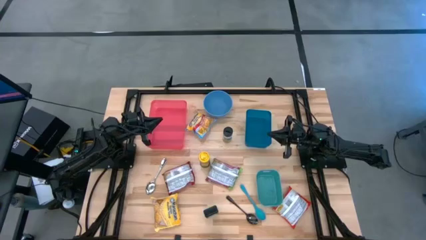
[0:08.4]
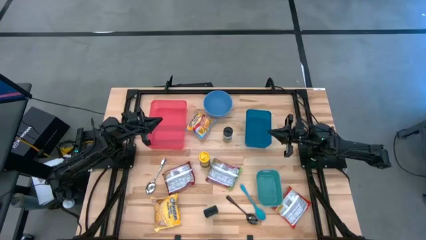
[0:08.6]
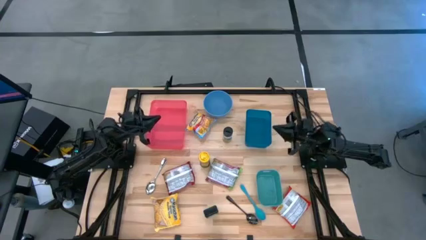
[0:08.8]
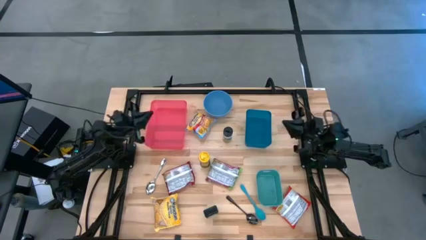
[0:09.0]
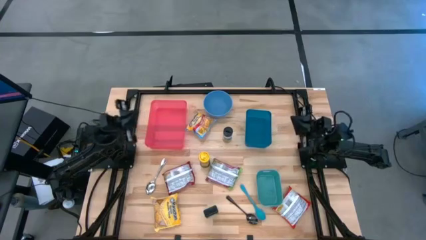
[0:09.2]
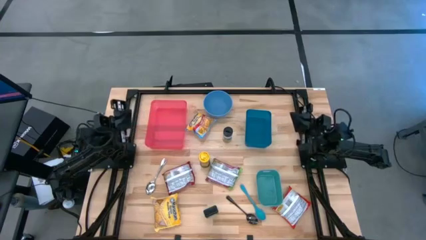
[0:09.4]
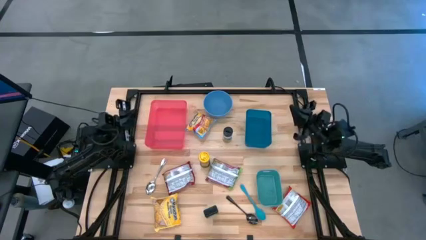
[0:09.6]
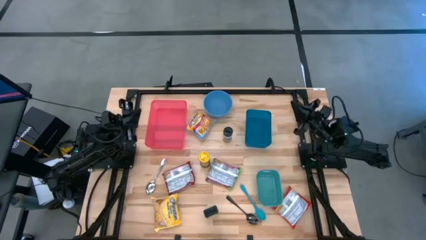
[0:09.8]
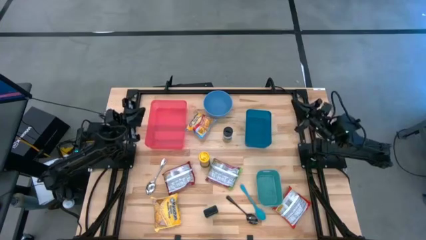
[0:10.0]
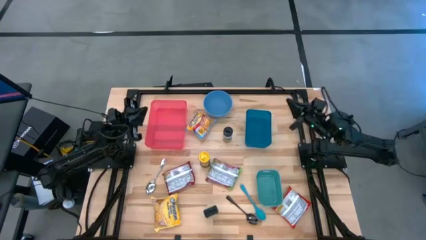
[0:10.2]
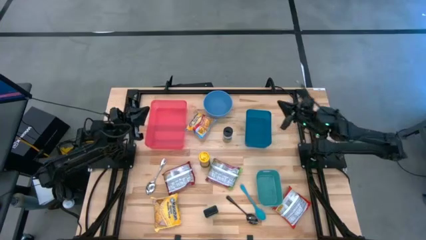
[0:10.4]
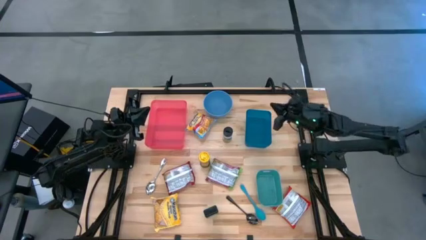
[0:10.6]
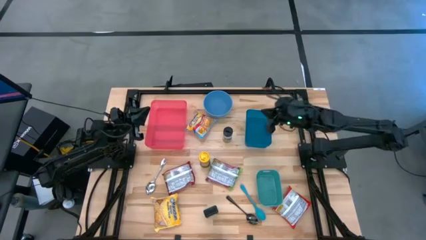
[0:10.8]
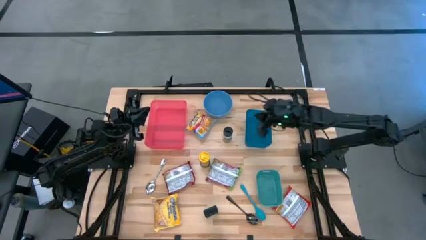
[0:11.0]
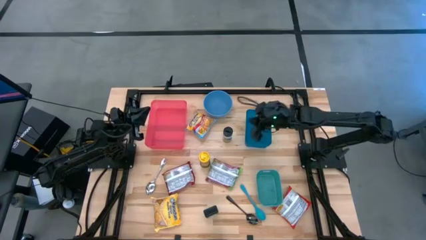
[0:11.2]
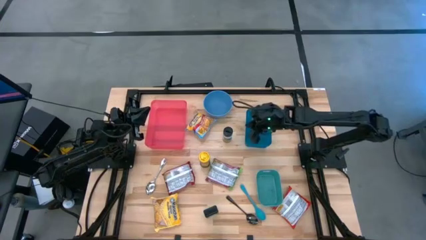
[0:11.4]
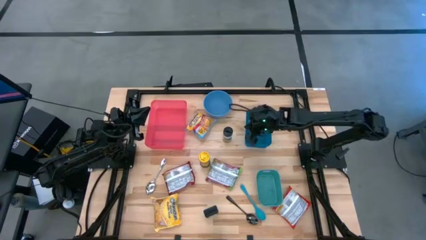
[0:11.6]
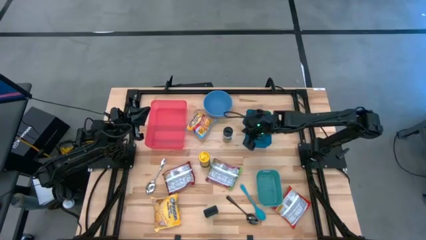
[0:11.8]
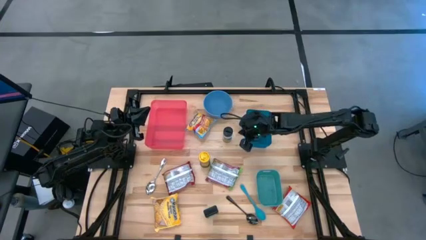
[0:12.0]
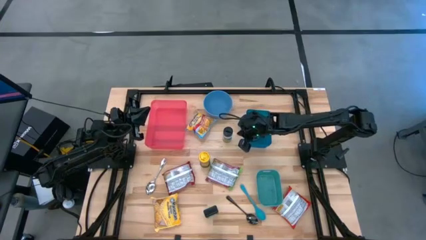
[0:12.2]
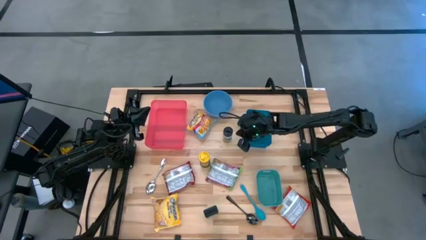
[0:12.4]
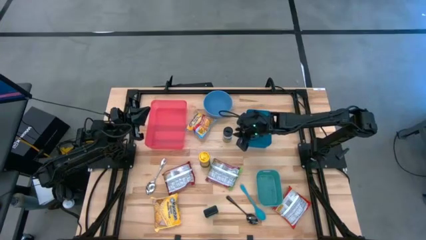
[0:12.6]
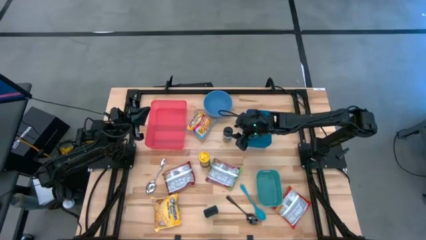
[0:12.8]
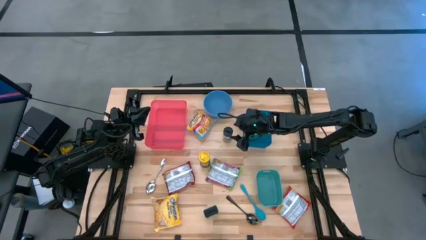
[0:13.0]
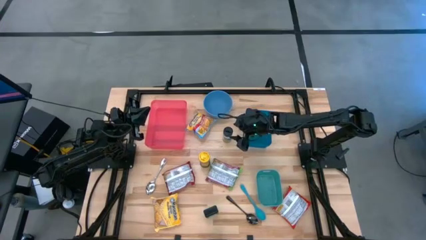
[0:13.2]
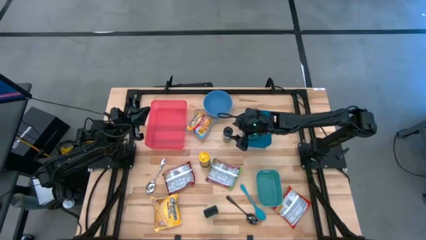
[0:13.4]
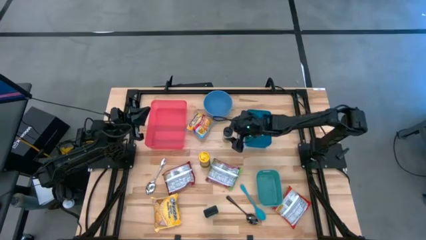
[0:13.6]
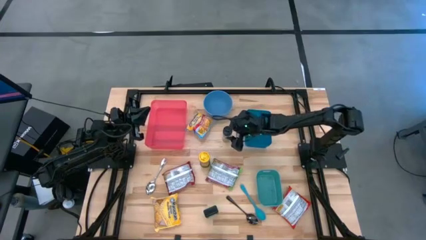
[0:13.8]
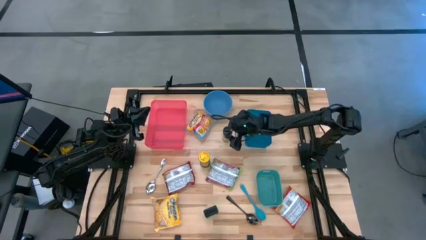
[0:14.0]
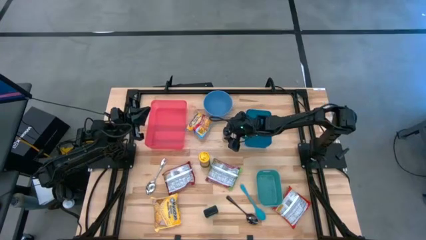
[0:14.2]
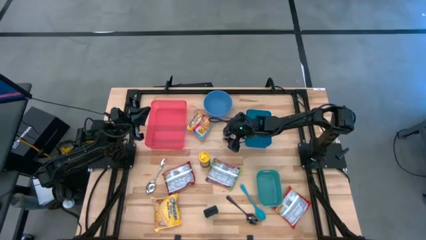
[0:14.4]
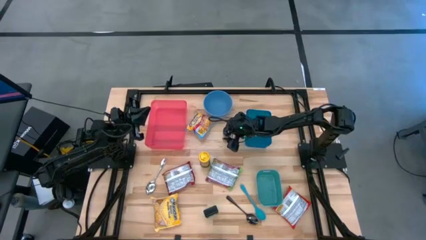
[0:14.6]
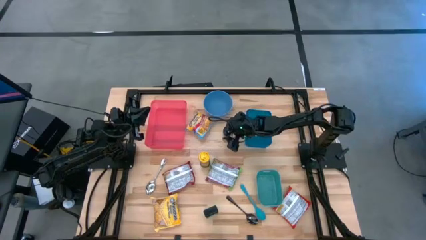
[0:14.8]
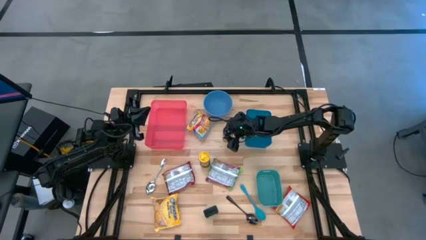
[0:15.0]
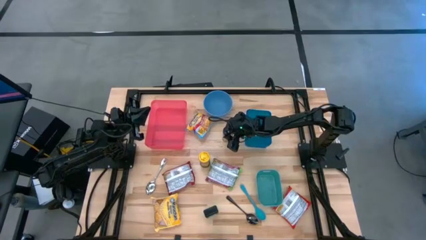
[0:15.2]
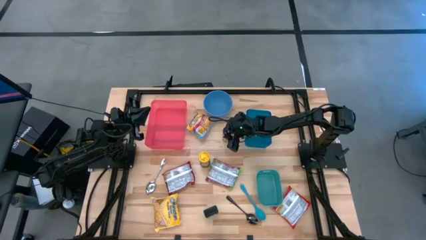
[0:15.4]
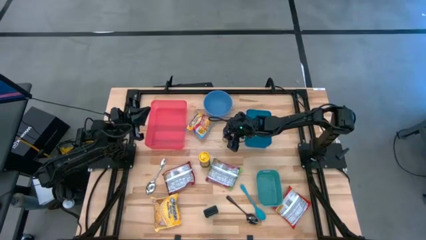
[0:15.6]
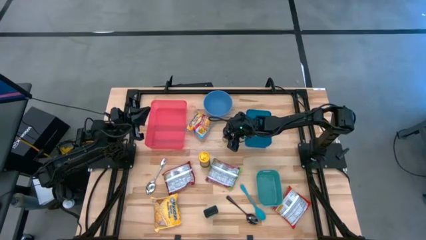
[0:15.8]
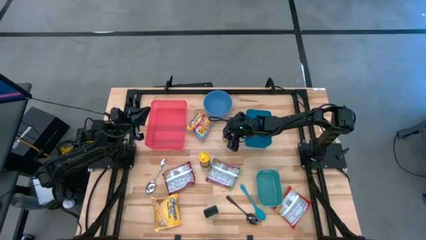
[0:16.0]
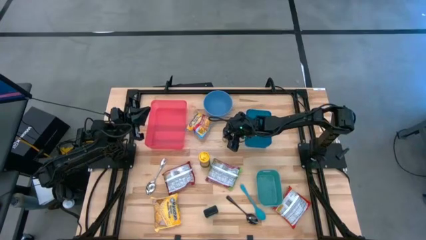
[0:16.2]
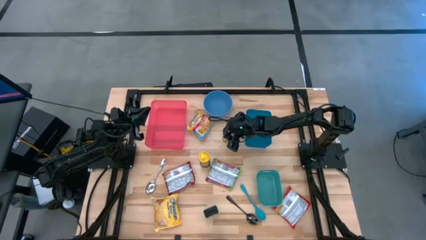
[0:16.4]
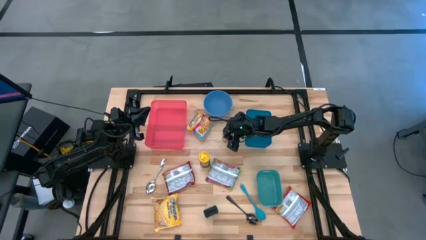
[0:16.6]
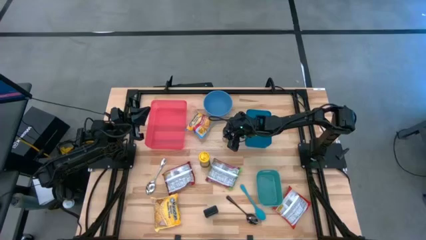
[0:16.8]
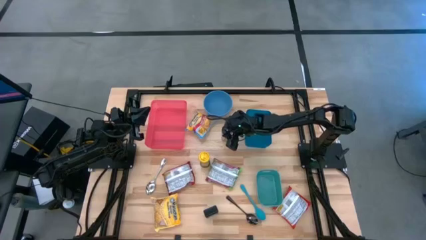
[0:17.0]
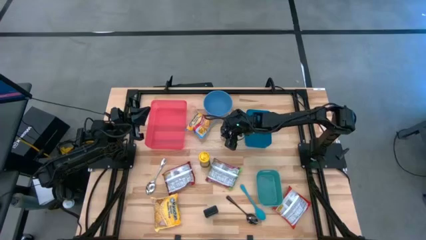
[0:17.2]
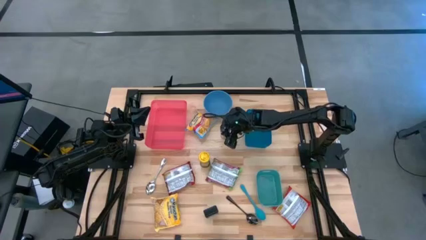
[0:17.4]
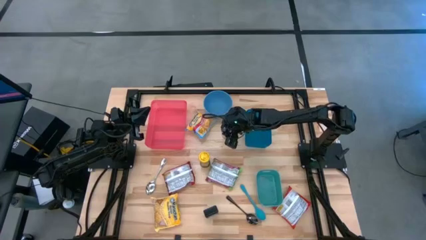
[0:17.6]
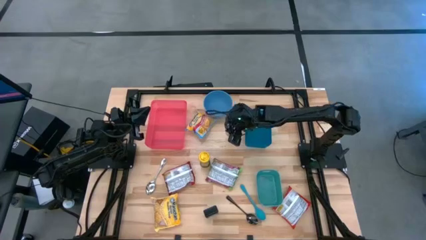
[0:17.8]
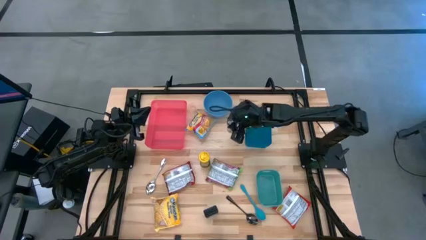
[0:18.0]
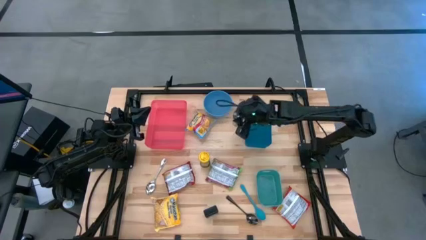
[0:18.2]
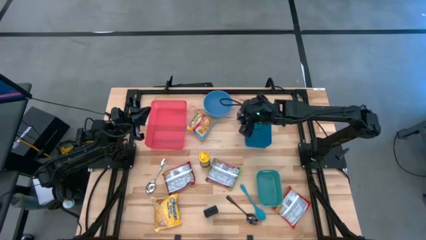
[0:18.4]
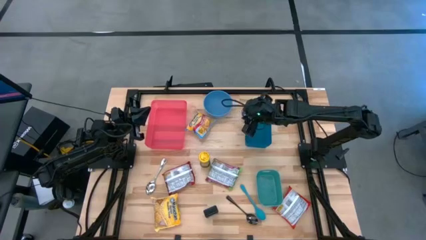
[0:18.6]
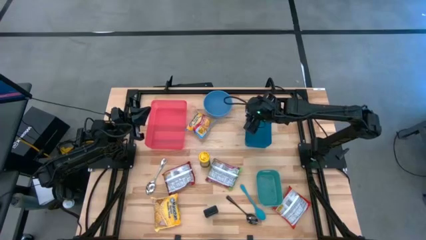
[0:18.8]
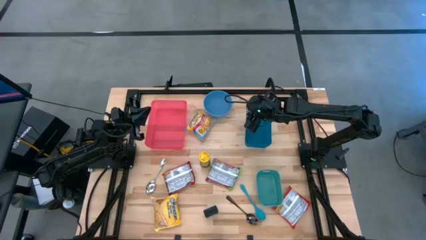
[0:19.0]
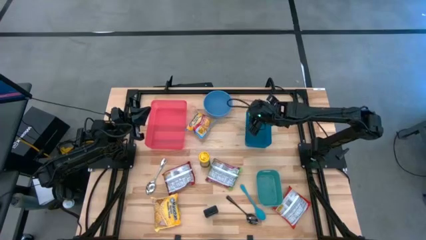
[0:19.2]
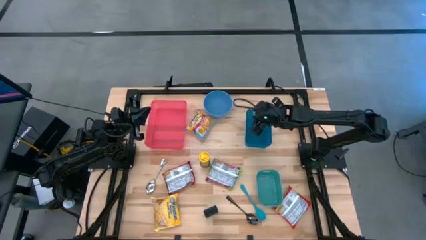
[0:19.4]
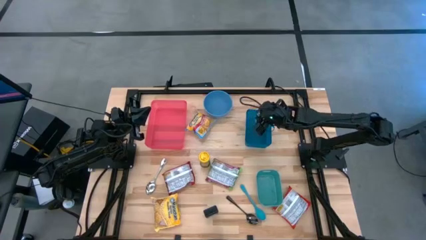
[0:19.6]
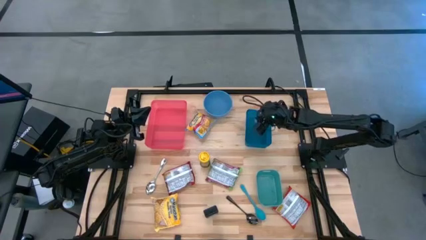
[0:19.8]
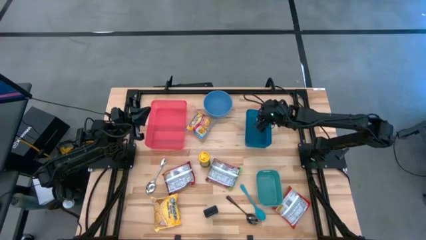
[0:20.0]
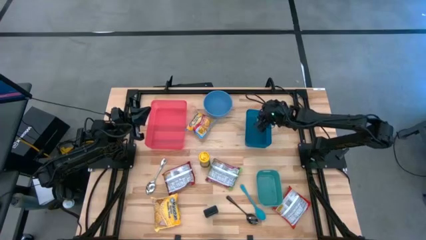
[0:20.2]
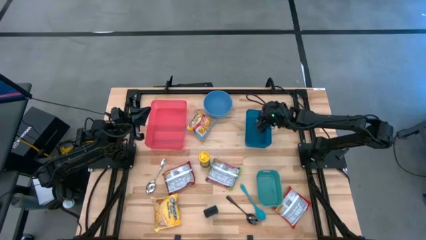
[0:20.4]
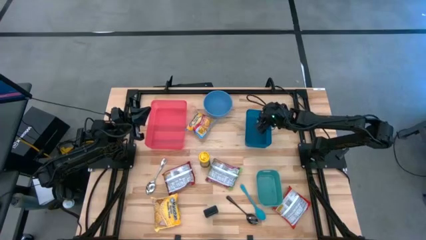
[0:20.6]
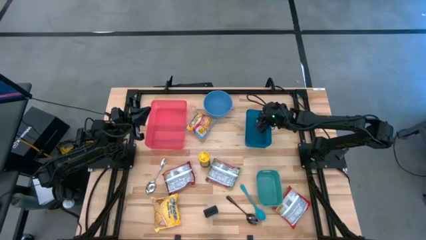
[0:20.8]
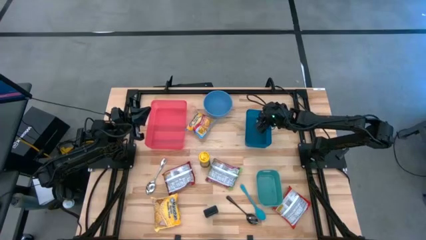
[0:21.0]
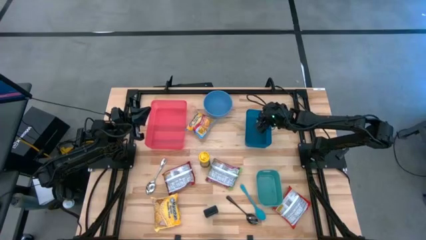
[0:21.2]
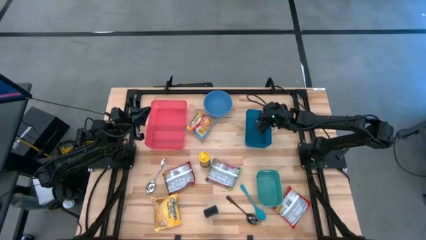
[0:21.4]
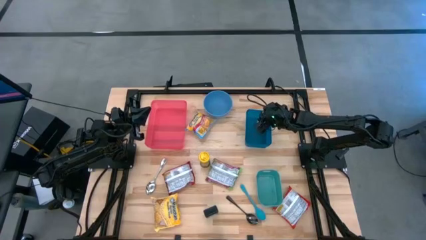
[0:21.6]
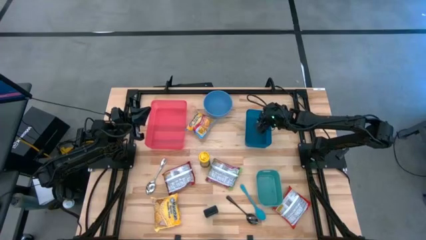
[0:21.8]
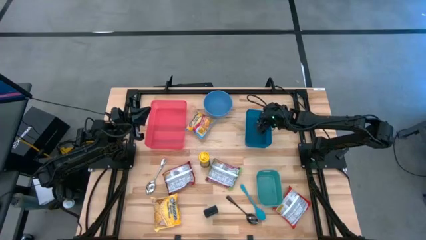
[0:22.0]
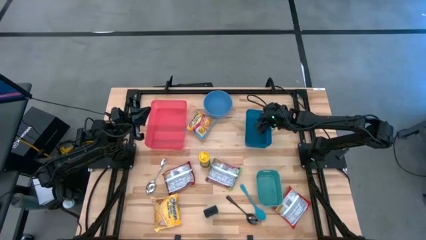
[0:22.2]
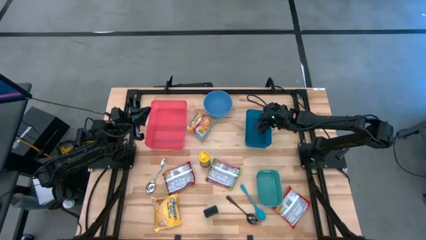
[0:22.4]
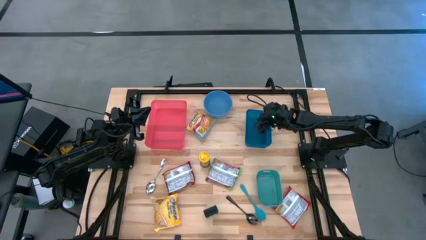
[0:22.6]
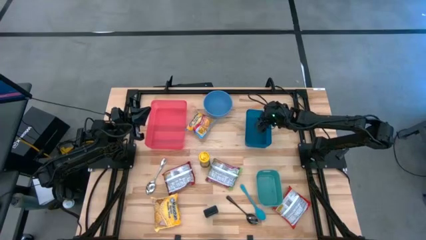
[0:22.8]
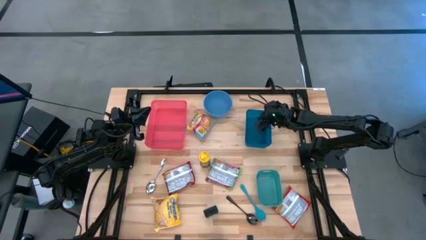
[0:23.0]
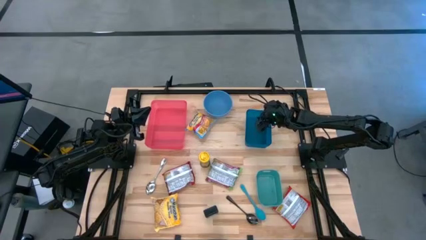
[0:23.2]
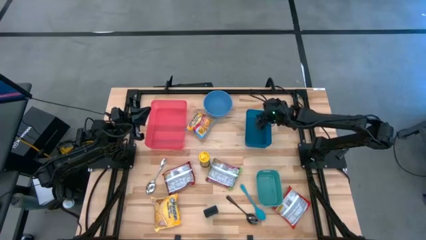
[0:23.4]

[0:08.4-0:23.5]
Task: Pick & Place Food Item
Put the black seasoning bottle into the blue bin
